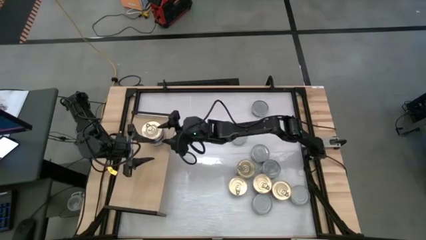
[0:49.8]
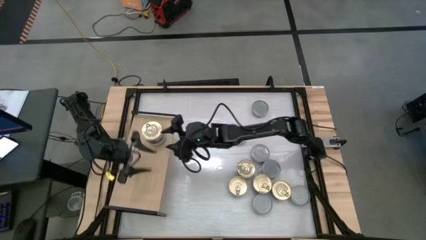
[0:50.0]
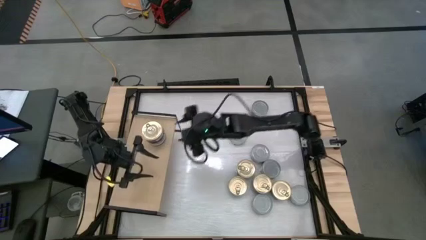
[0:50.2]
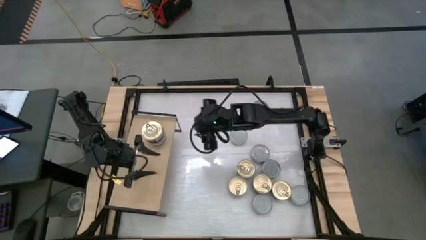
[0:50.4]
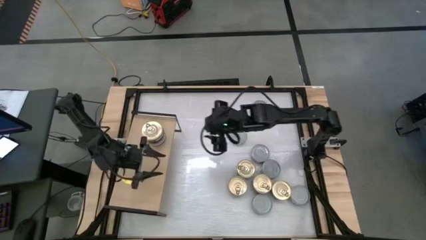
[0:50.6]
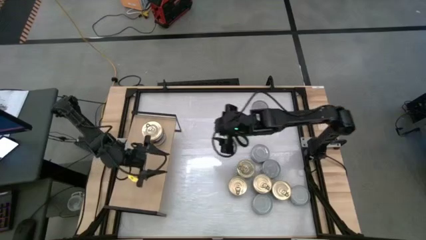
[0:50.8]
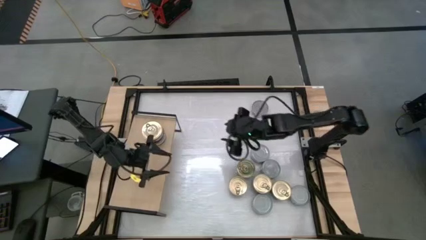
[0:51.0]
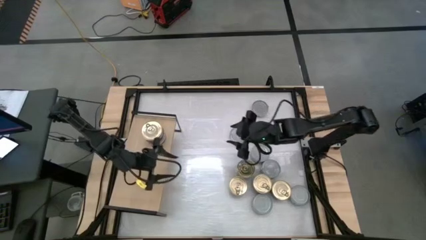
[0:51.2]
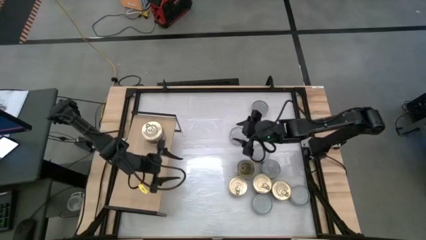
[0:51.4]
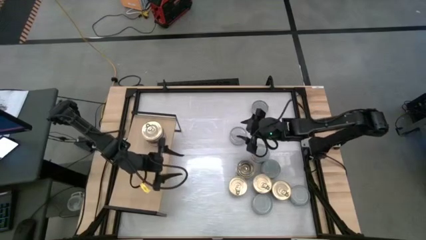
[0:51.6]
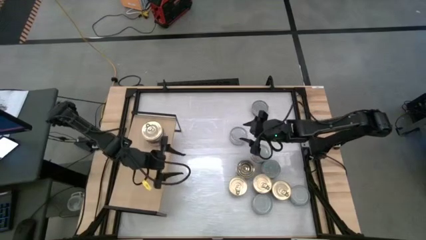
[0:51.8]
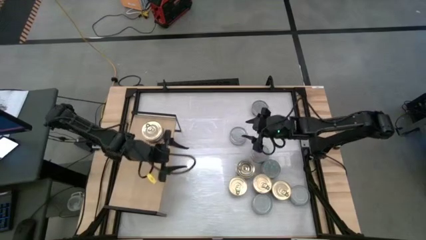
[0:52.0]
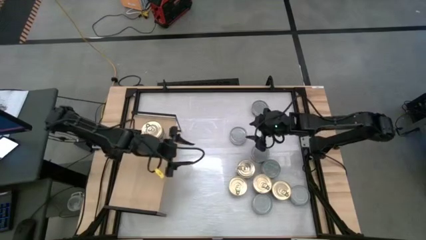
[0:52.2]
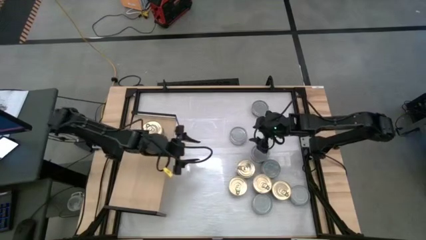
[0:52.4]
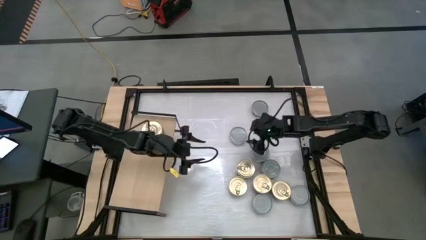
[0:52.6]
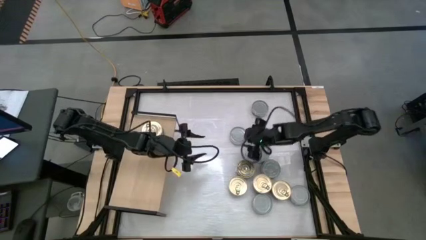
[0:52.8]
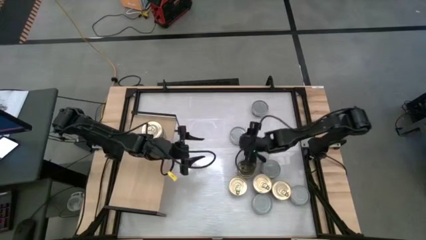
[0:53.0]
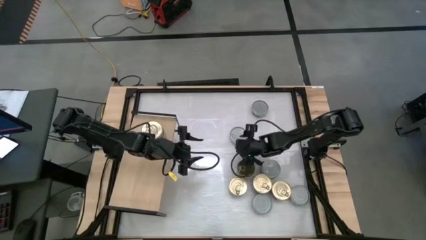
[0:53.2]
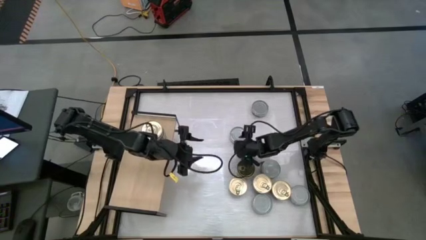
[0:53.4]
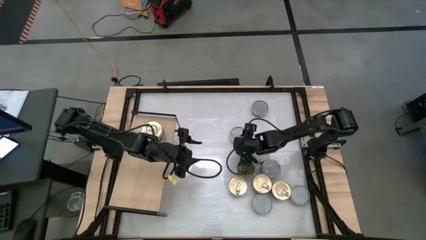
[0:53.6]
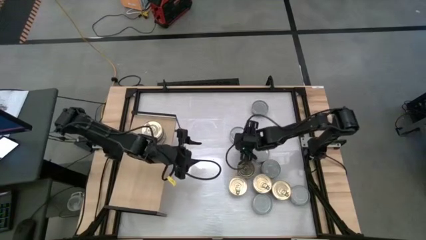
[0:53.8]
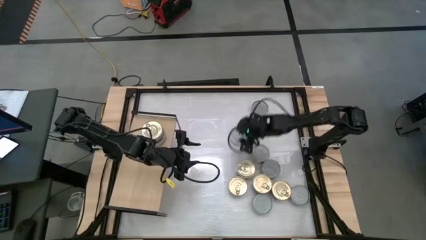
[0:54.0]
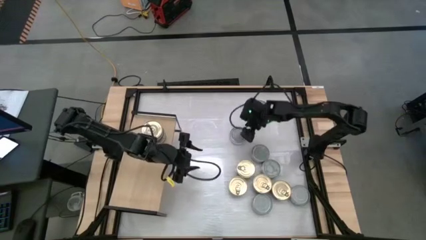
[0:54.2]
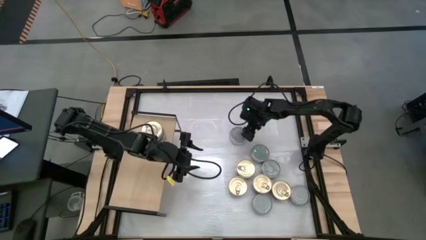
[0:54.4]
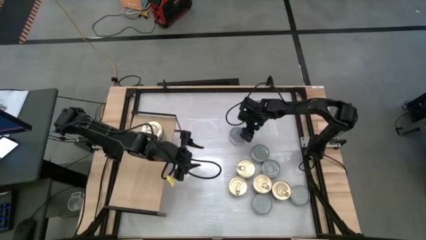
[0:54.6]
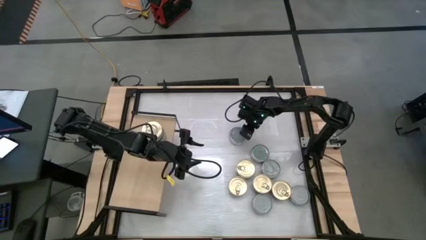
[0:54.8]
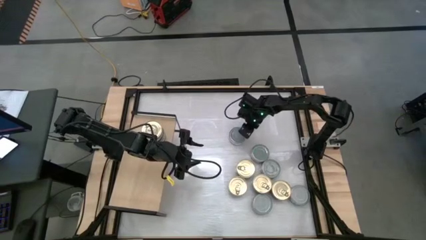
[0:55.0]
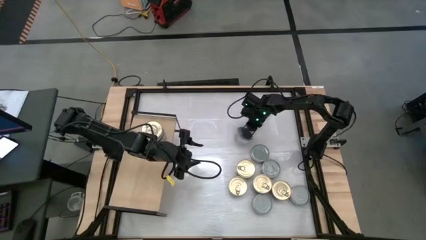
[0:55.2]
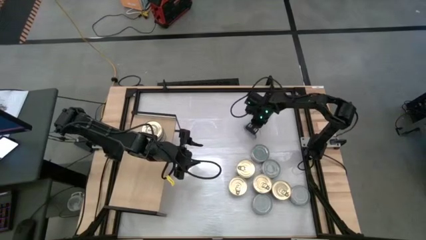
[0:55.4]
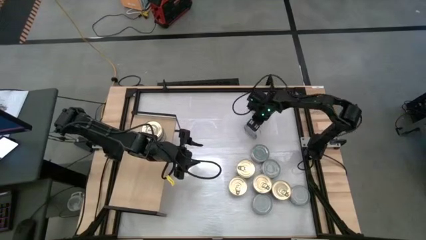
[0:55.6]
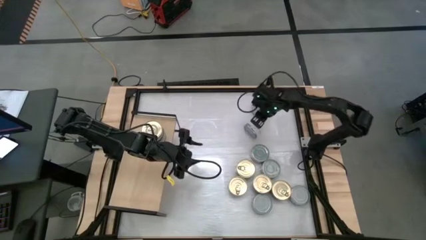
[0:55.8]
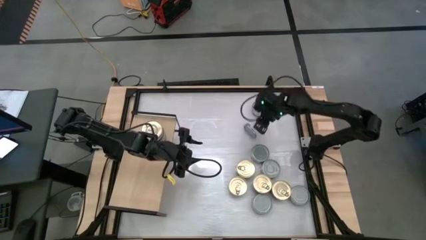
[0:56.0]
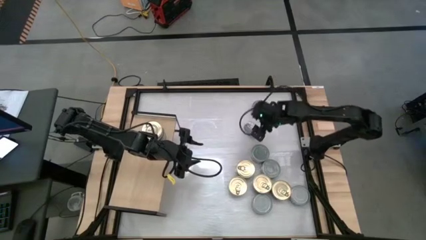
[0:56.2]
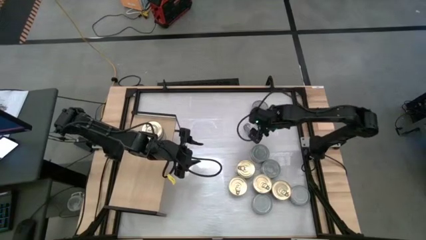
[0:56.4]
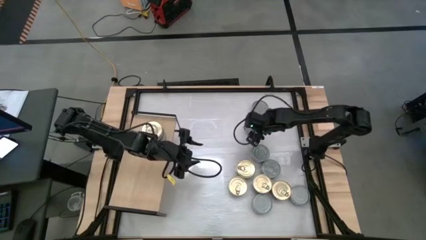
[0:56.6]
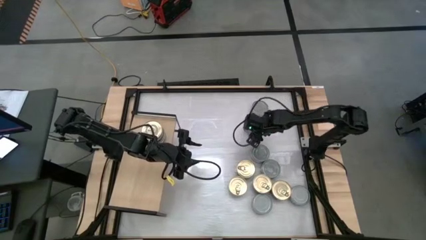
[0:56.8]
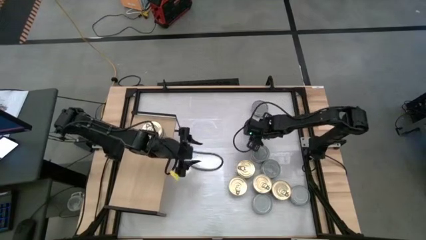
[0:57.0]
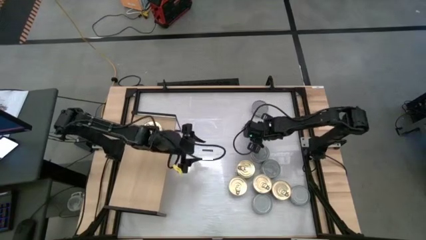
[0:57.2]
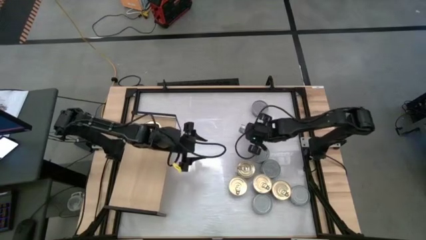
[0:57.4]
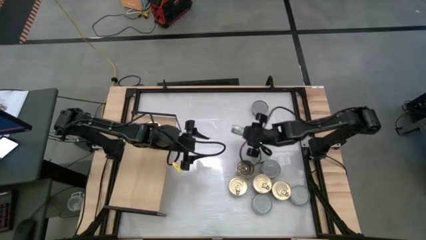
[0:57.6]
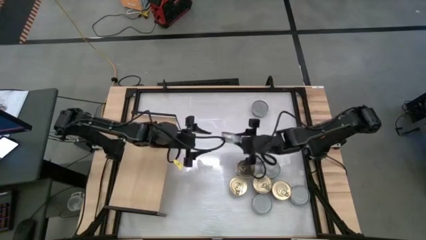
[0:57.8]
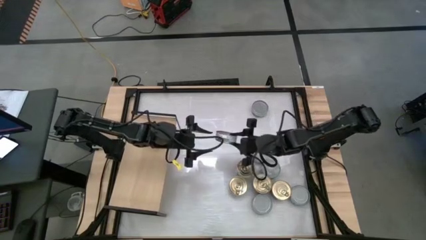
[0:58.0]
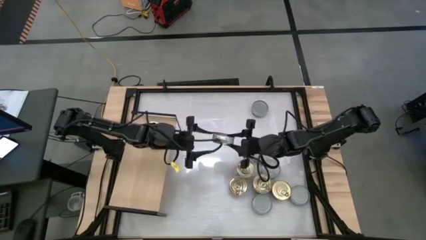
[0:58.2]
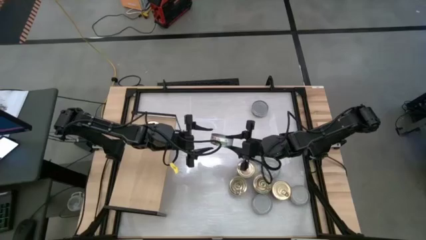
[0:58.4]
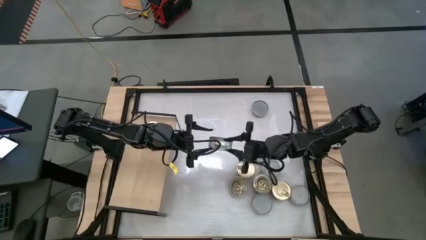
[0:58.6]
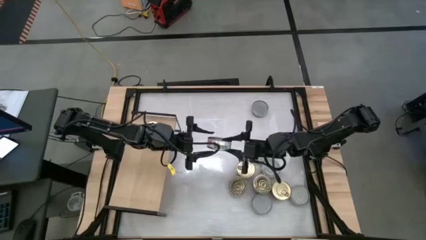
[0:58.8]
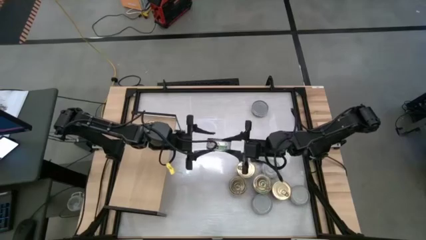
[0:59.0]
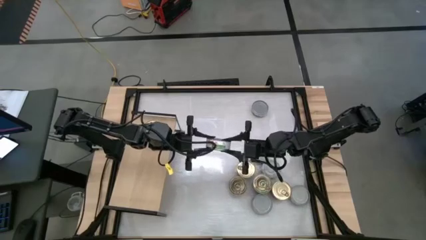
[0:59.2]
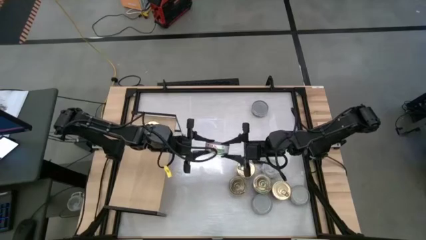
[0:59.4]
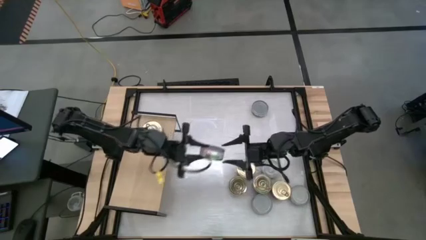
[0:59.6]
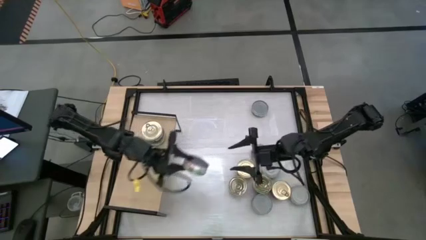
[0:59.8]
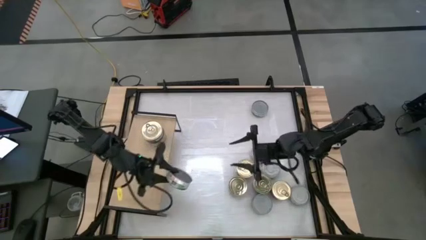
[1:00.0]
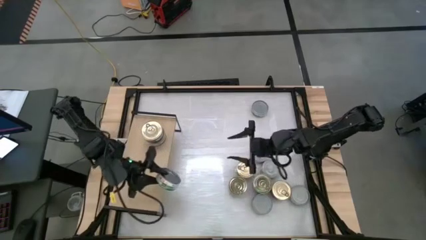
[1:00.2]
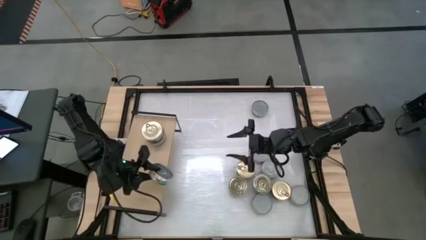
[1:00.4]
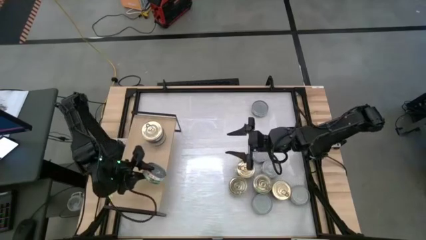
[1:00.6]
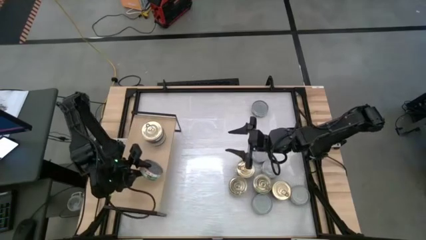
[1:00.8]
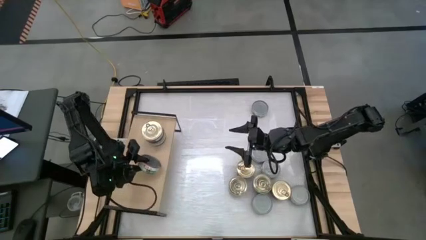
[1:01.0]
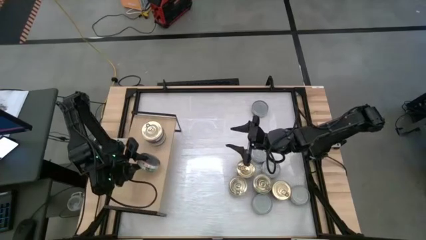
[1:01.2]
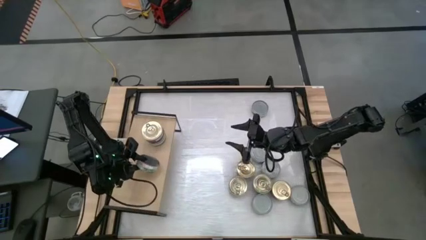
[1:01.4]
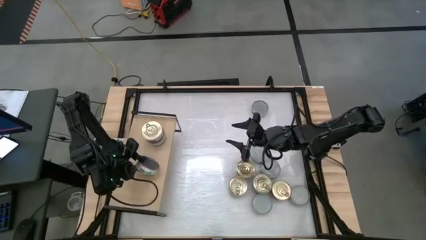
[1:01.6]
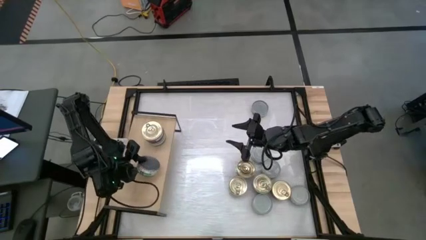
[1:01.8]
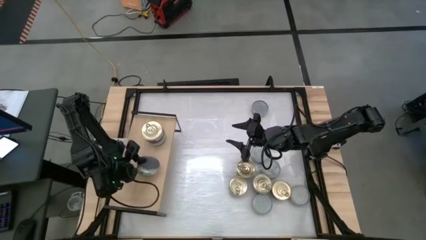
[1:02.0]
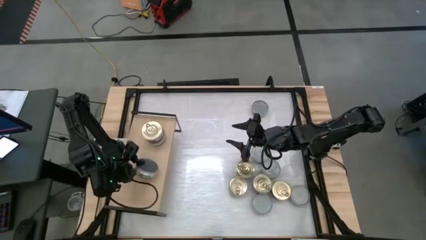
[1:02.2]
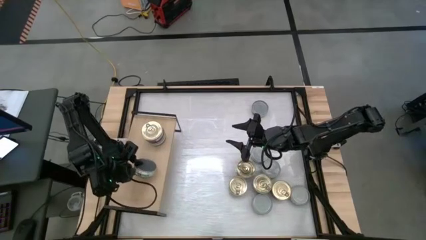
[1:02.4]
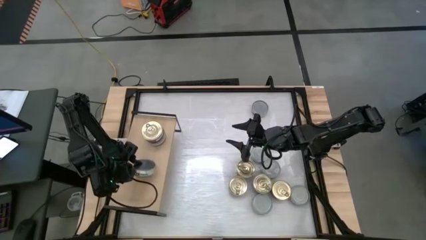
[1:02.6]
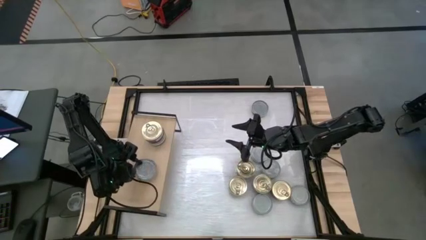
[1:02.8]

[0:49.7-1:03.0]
Task: Stack canned seafood by type on shelf
Put the green tuna can on the shelf

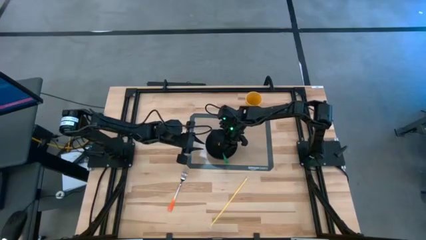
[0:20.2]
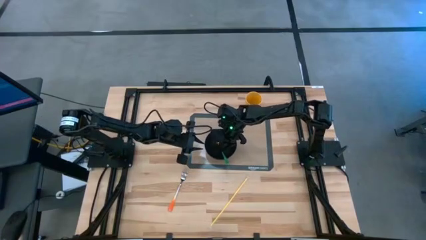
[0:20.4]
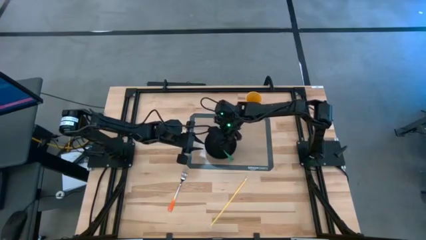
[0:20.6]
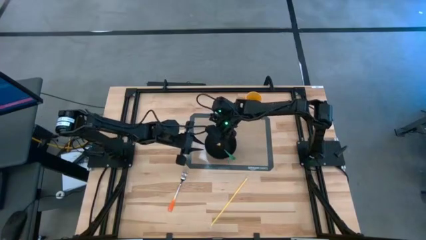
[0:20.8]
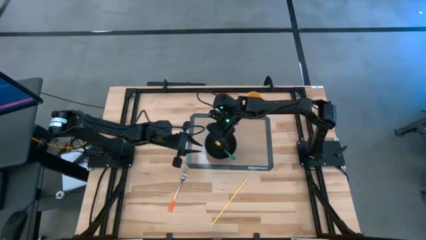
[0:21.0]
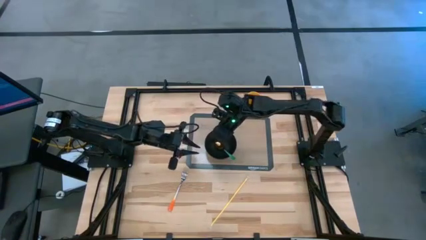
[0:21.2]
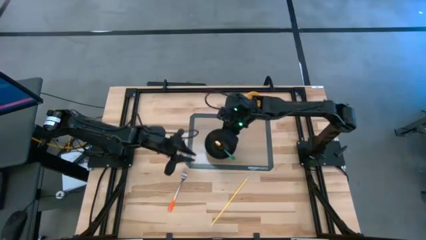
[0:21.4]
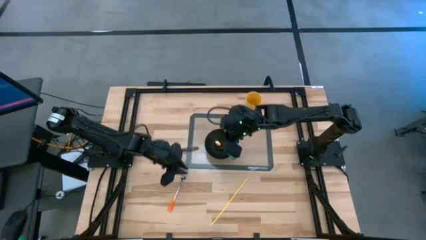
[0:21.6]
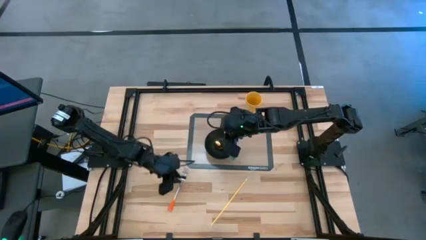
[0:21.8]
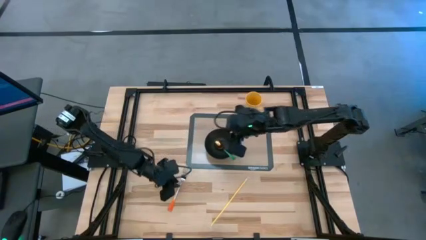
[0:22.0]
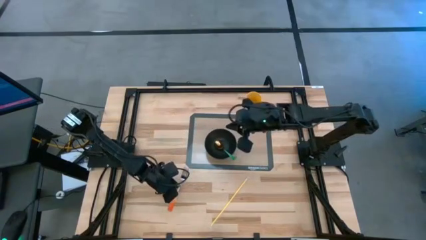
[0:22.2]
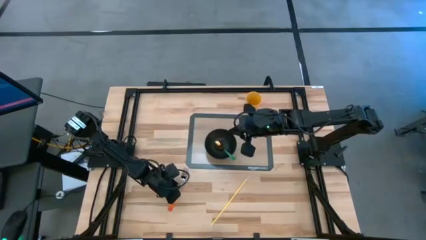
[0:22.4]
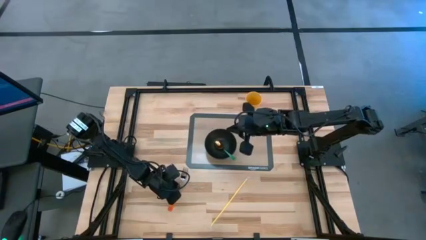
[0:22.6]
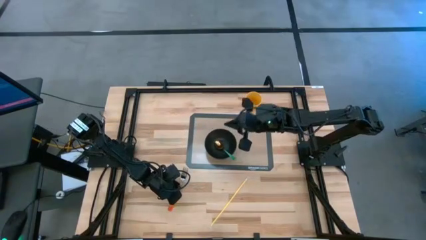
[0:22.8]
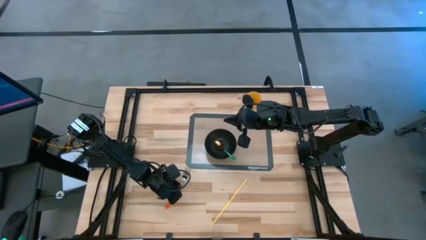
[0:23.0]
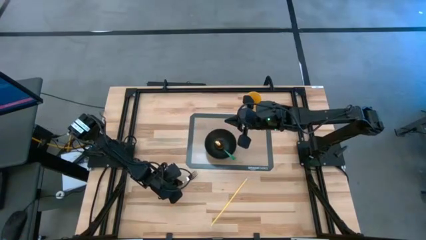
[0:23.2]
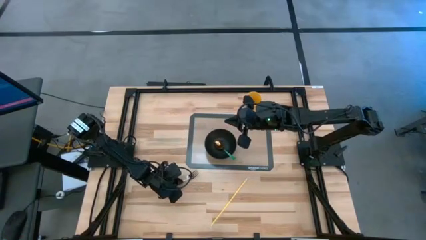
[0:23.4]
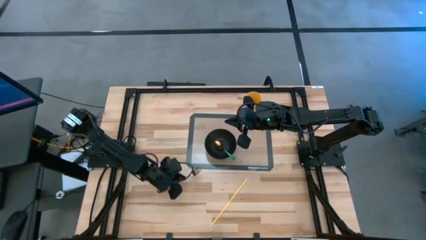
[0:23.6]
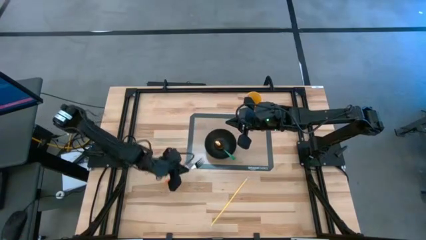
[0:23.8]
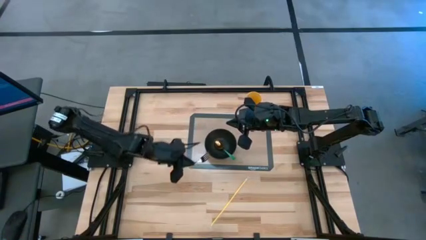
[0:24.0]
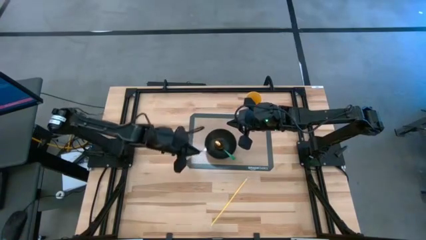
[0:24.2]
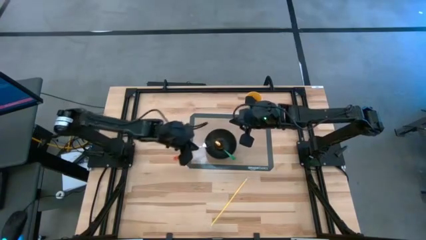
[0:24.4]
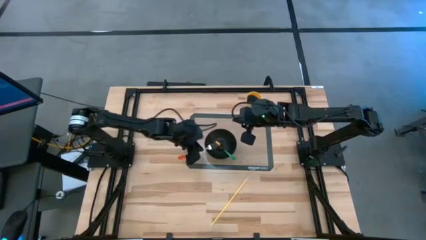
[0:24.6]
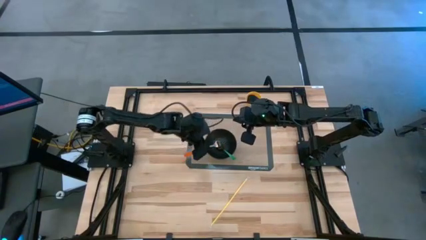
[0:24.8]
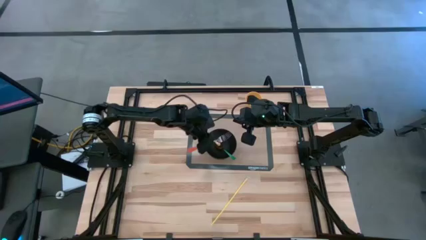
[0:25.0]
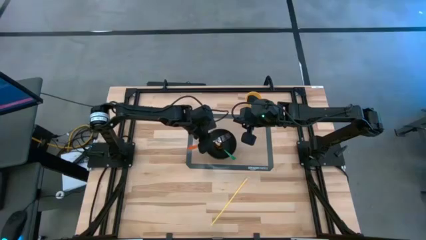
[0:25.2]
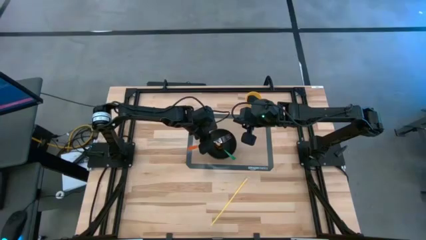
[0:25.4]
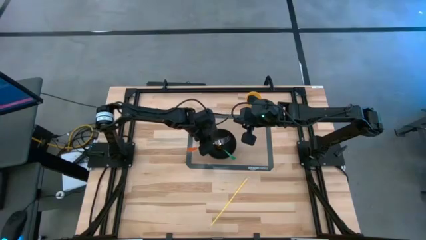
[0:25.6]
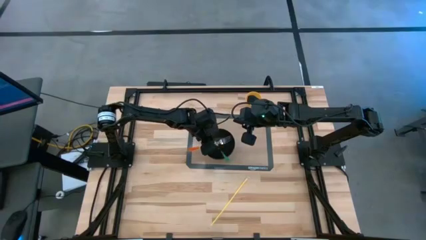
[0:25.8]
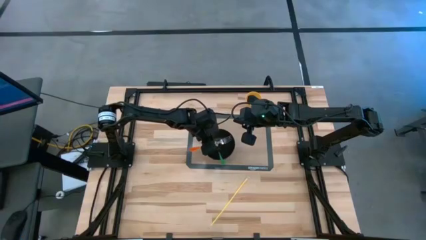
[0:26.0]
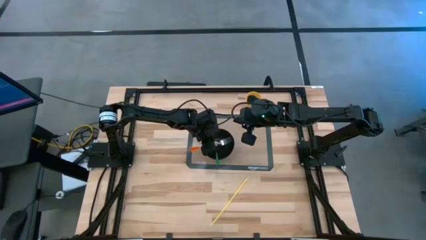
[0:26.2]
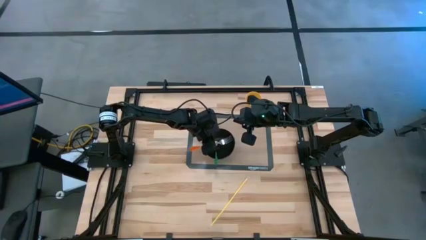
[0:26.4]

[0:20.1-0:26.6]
Task: Pick & Place Utensil
Put the orange fork into the black bowl on the transparent mat
